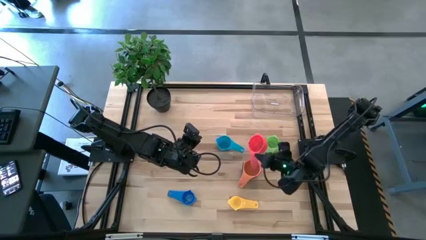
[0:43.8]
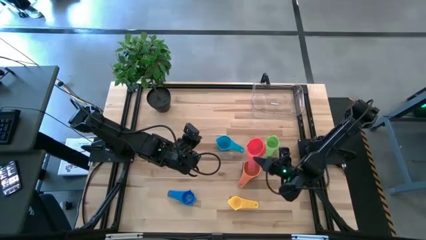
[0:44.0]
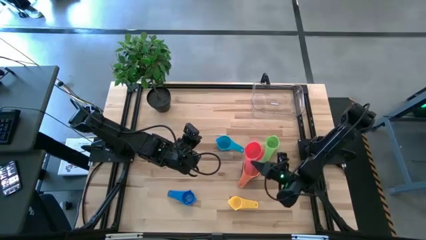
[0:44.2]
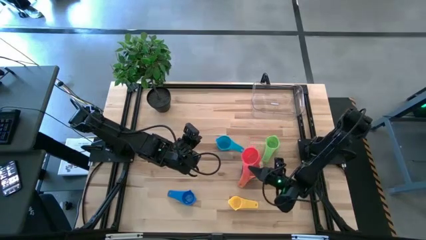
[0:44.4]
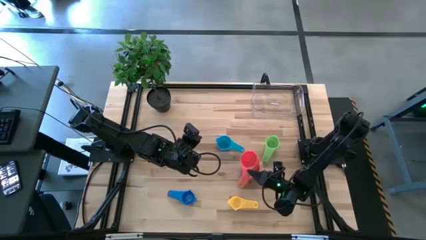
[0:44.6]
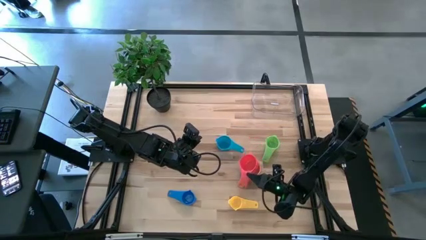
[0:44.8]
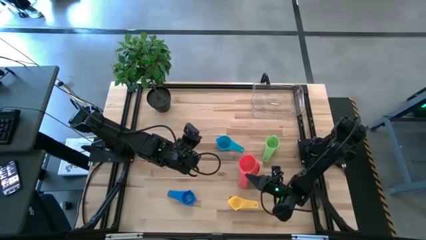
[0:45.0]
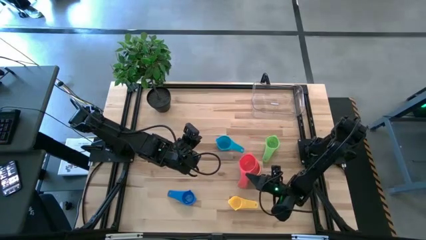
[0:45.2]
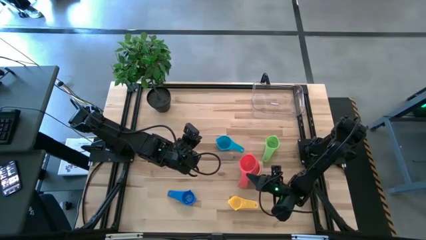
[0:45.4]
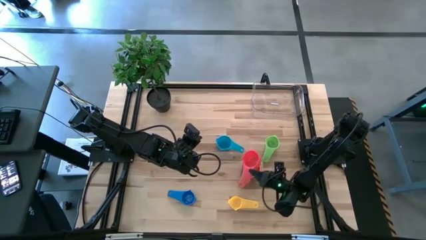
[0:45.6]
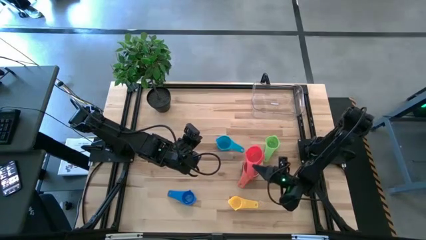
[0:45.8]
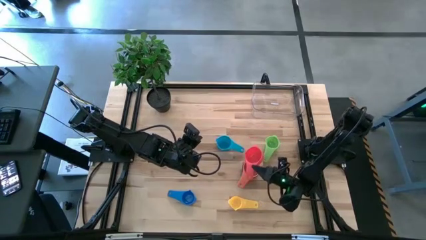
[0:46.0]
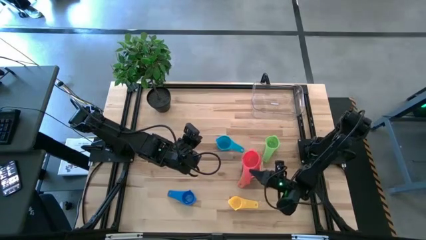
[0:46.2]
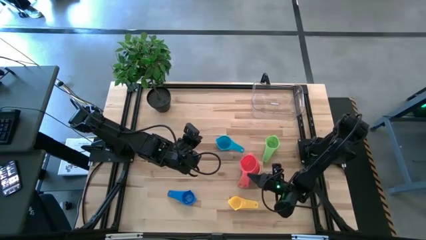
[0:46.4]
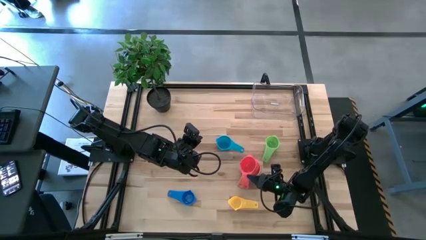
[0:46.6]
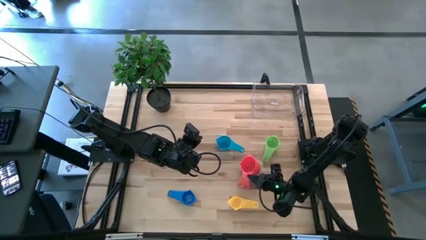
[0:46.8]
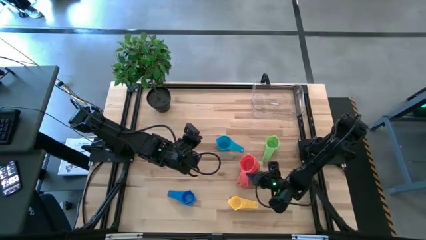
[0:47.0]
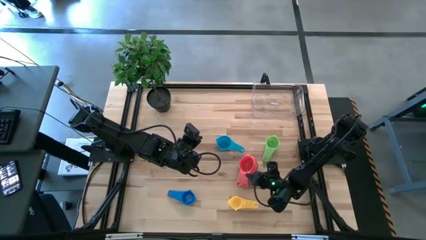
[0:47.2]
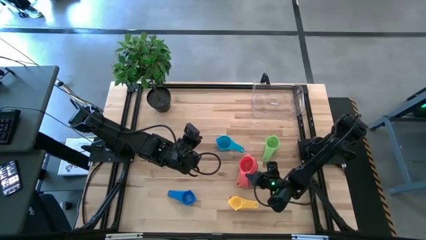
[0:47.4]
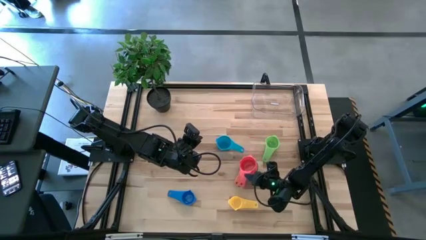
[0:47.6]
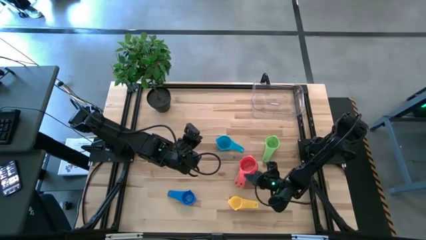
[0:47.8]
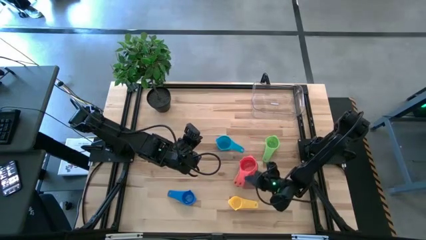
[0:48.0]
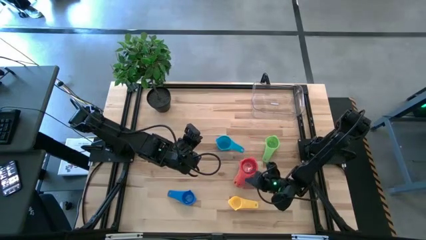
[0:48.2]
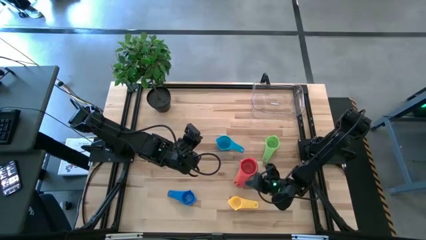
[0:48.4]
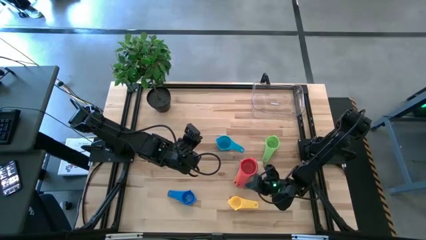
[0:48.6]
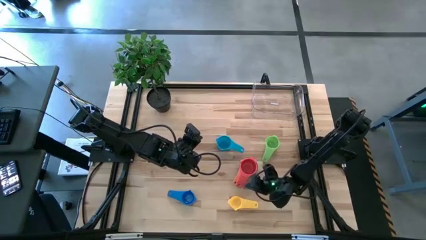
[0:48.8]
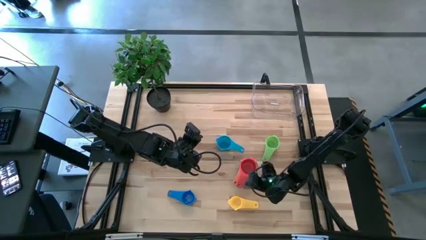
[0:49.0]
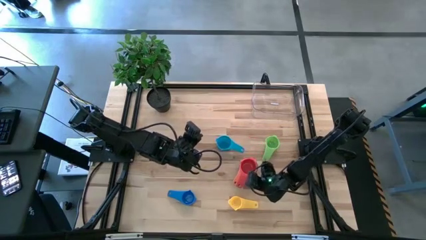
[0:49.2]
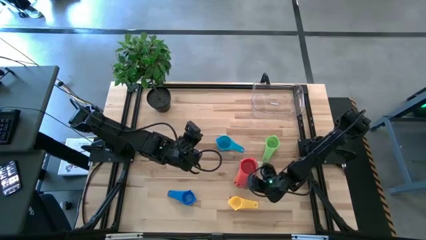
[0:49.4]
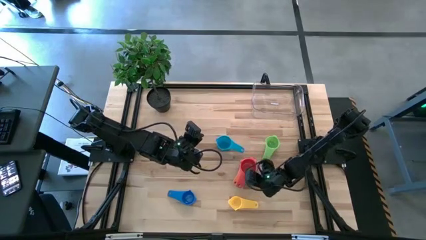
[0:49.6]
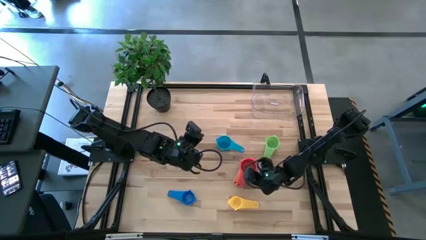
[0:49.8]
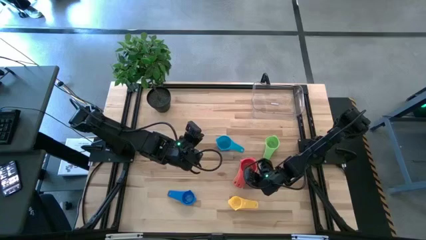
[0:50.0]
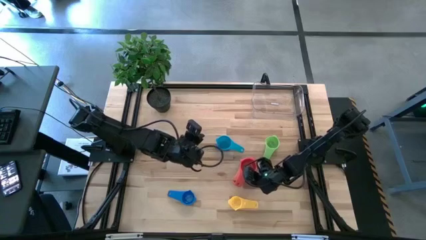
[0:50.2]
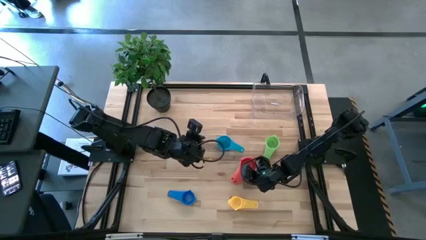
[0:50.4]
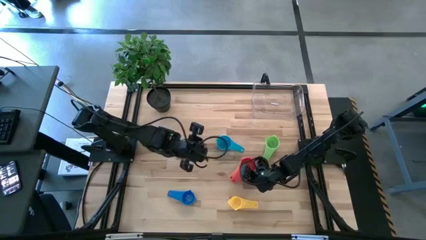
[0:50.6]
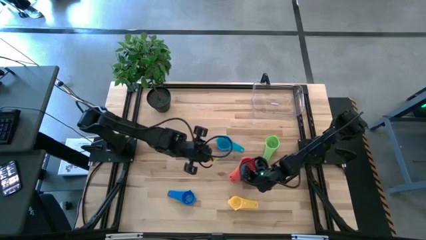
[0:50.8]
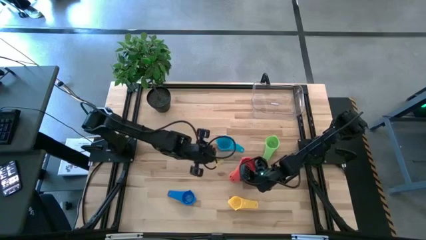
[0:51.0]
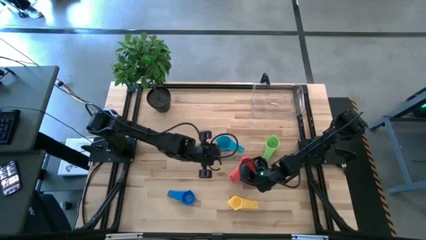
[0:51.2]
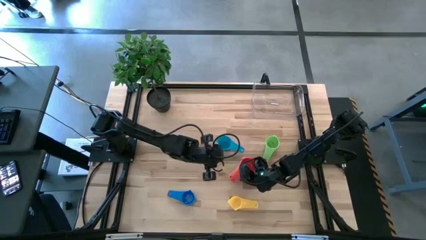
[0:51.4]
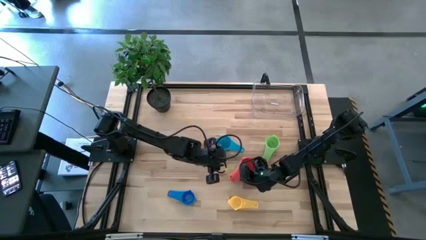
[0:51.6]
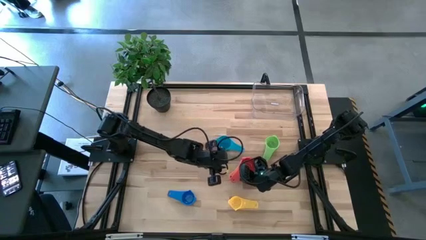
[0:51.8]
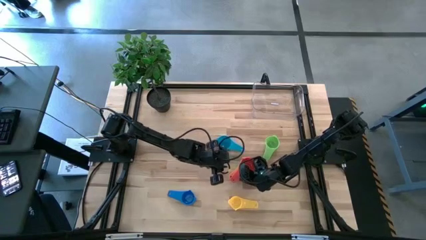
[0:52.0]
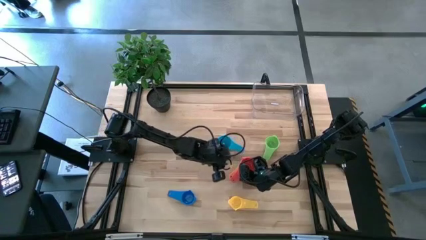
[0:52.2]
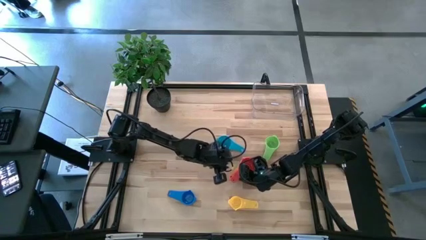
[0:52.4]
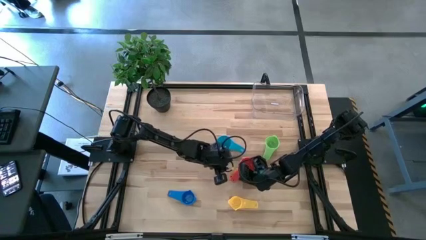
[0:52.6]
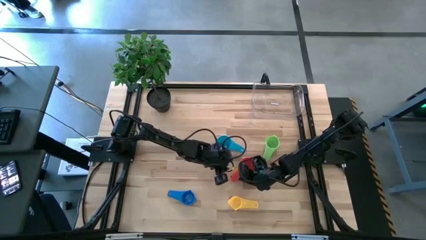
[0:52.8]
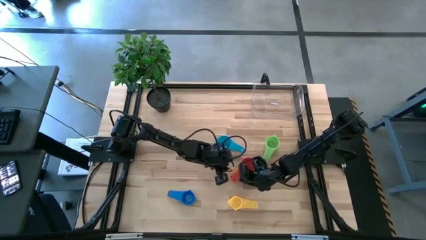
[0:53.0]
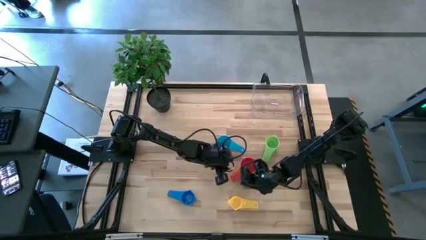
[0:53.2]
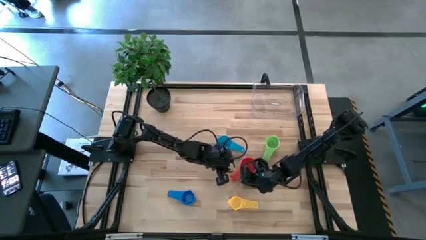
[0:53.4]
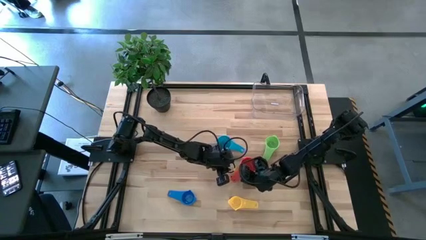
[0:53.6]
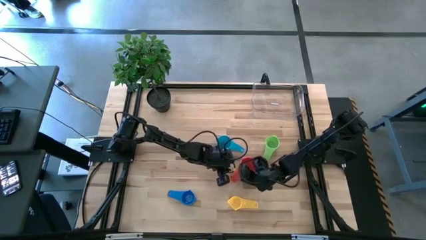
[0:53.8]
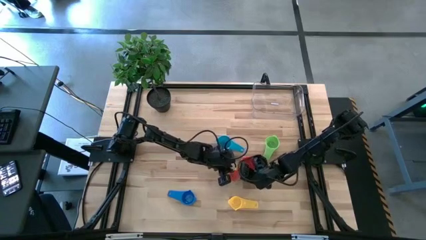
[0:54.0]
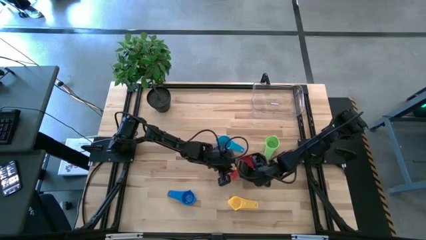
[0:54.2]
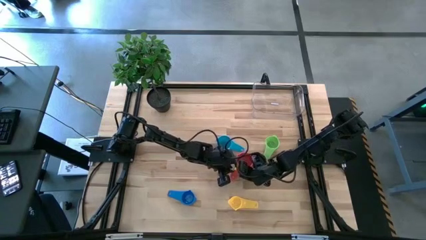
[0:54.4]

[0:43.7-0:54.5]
Task: Nest measuring cups in basket
Stack the red measuring cup on top of the orange measuring cup
